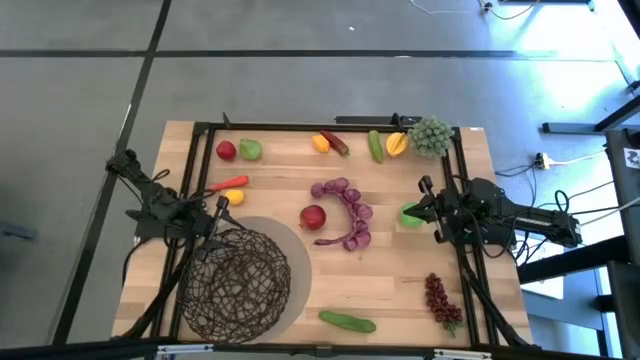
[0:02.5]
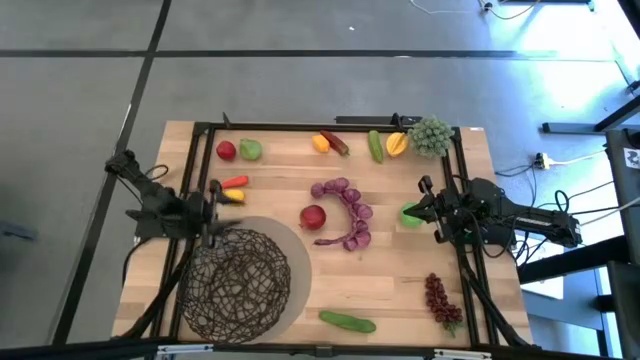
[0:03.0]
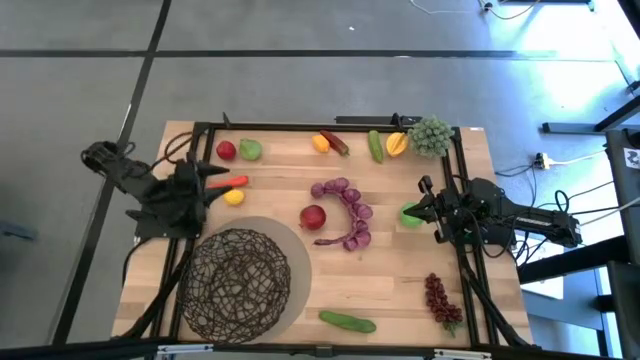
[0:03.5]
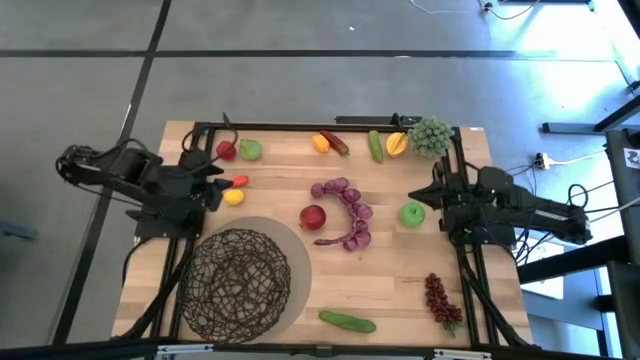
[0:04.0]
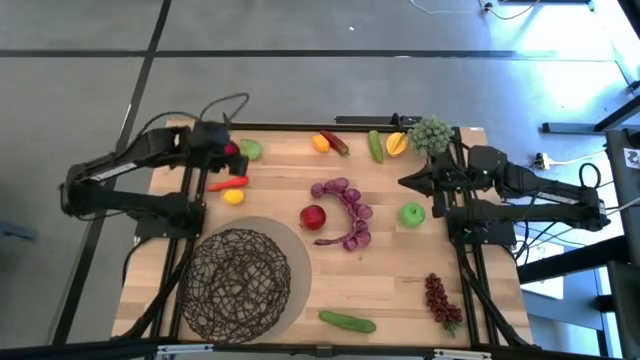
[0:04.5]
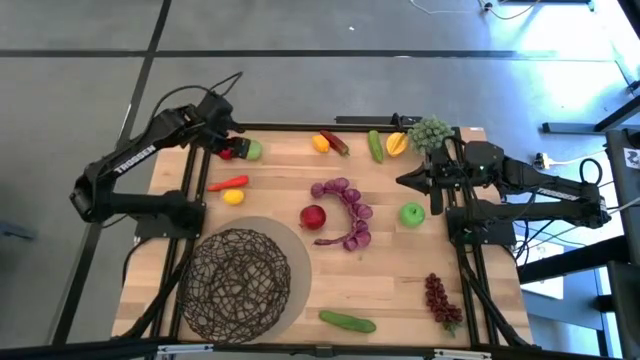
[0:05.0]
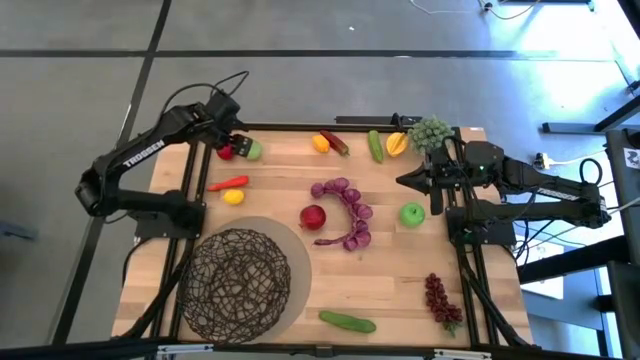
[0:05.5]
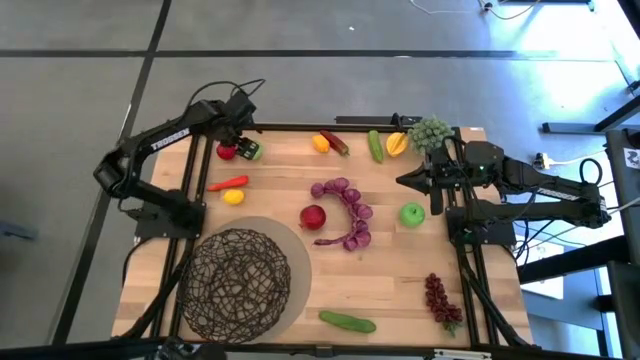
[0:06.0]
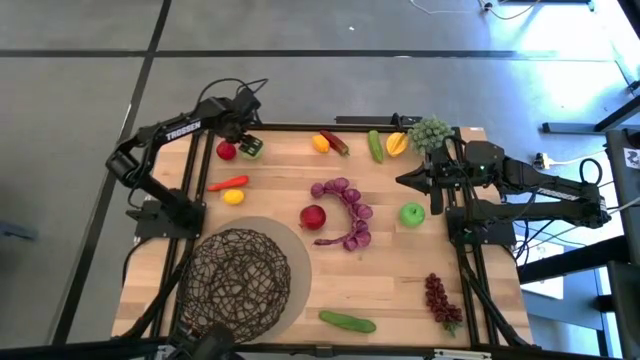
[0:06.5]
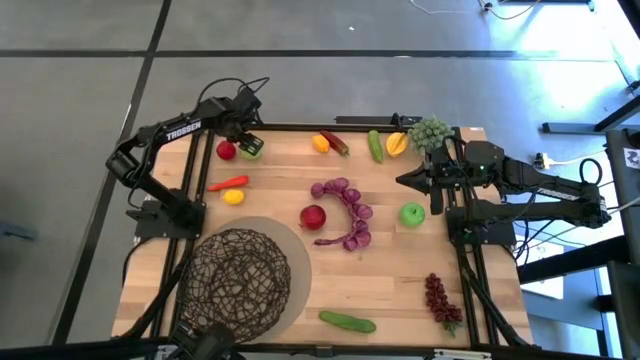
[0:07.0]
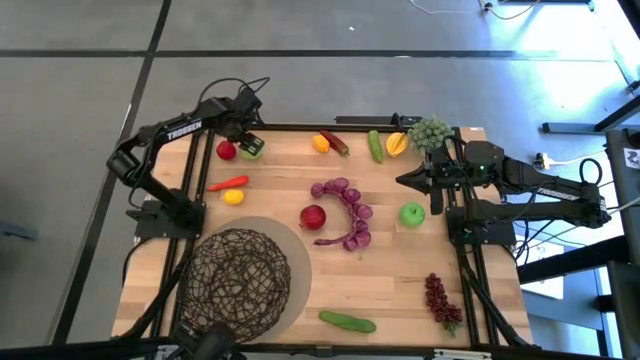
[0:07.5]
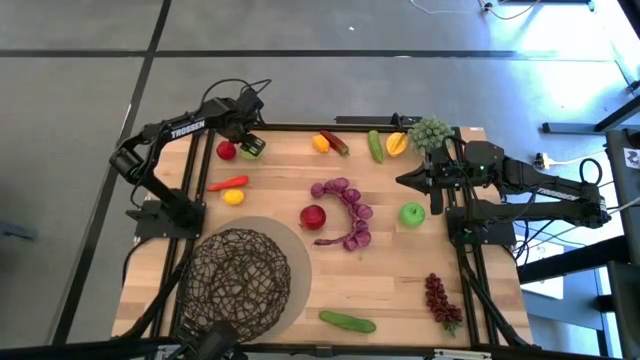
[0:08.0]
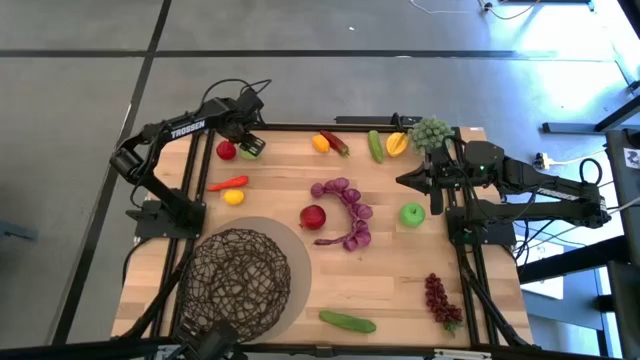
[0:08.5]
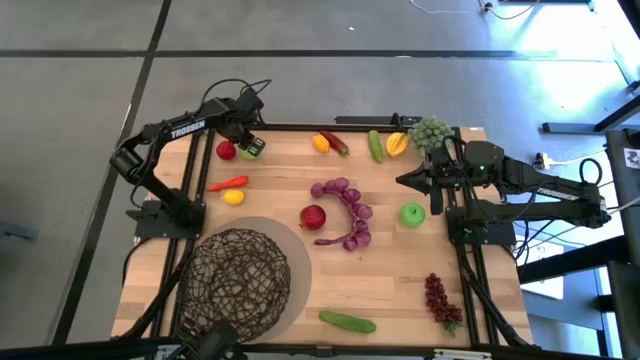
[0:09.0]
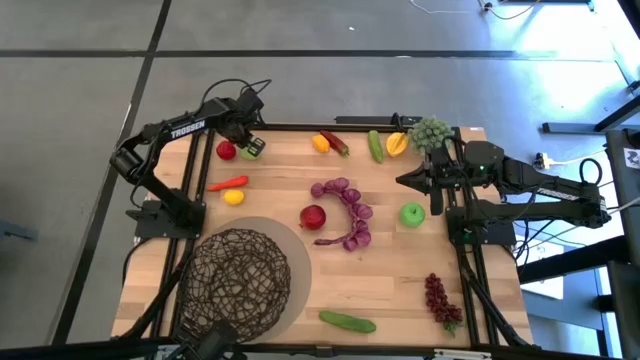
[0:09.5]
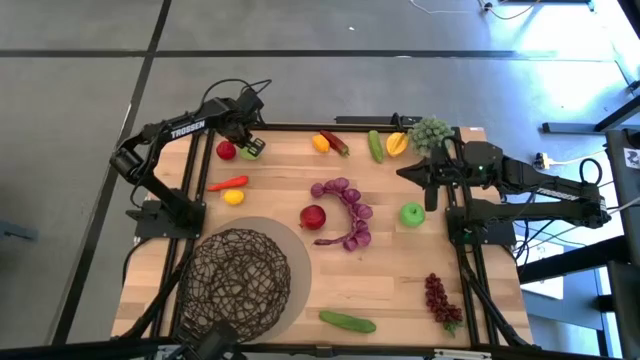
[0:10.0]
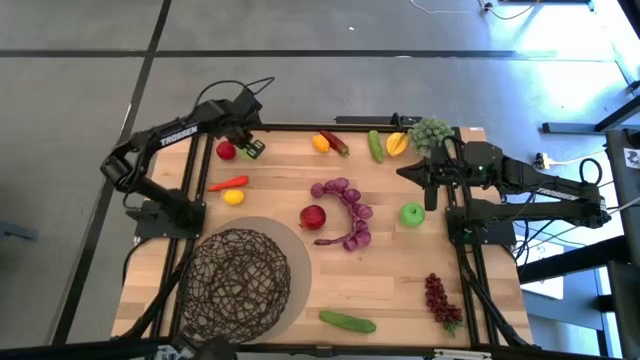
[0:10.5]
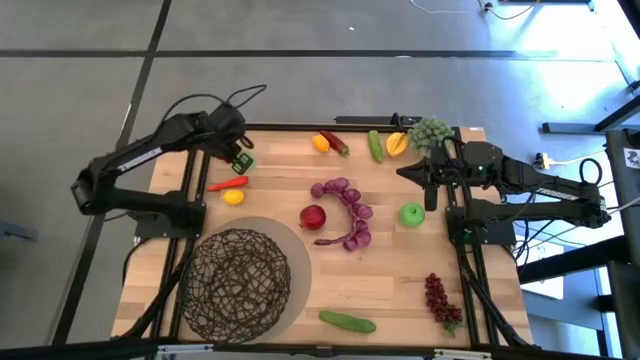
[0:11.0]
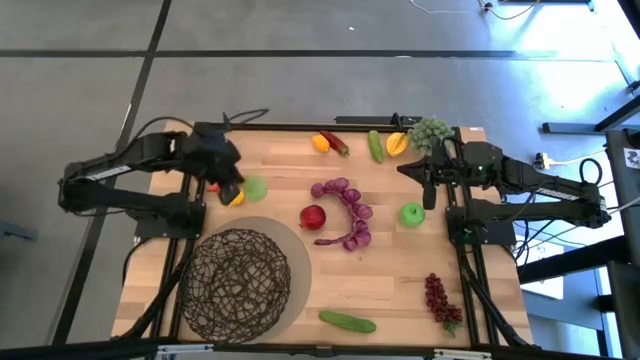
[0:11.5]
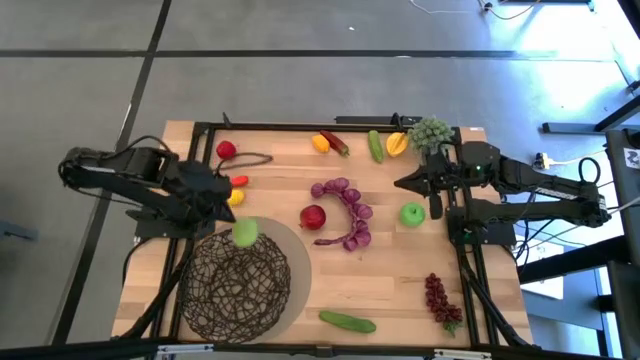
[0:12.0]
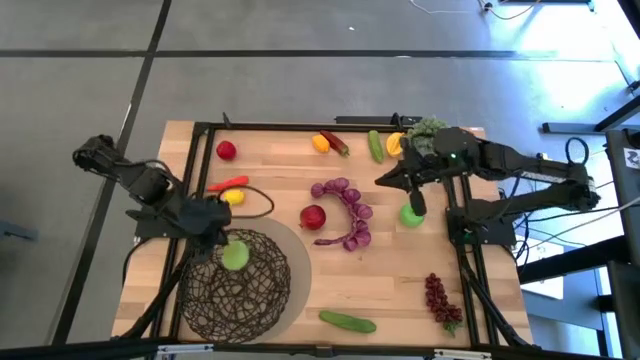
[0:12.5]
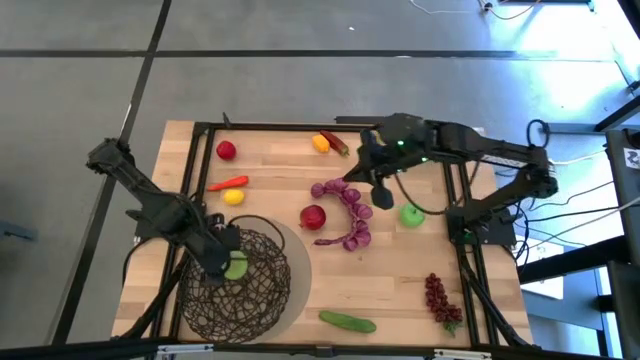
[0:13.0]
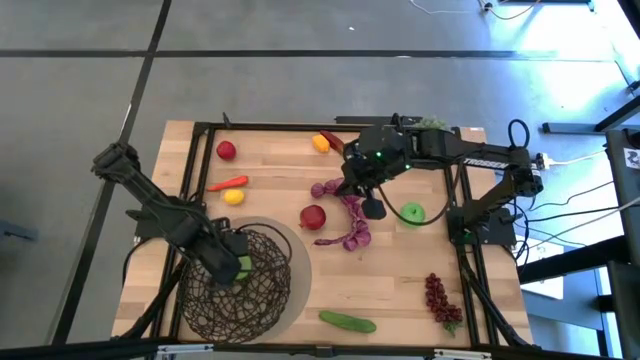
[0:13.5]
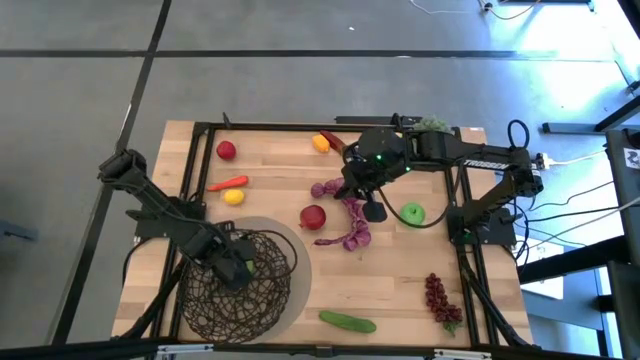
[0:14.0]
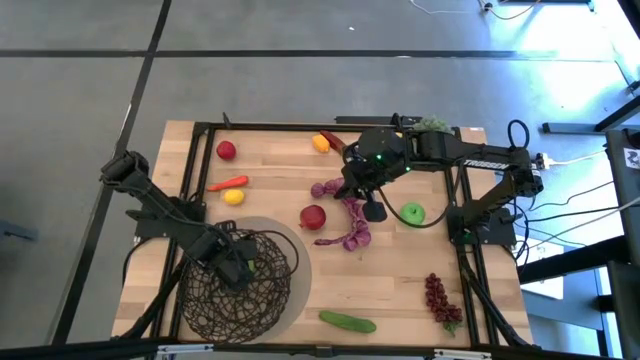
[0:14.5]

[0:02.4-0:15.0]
Task: Build produce basket
Put the green pear into the black wire basket
